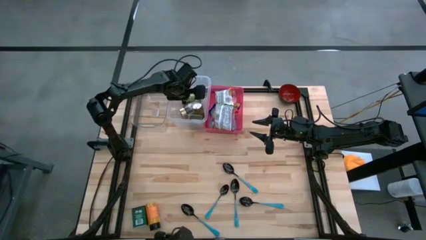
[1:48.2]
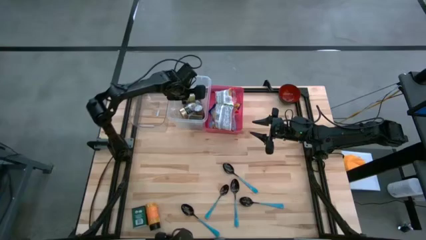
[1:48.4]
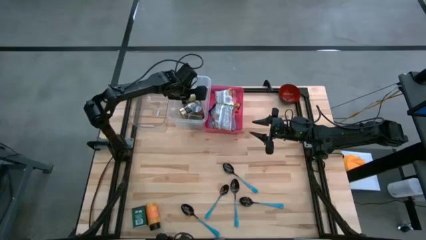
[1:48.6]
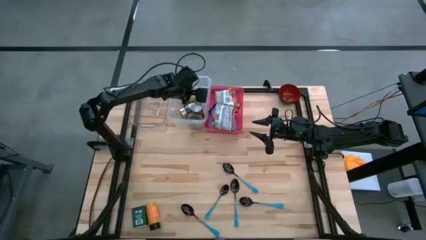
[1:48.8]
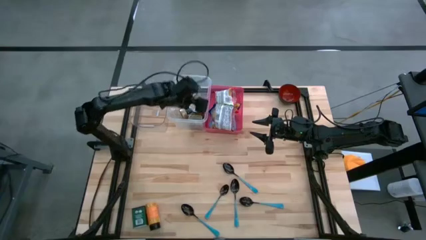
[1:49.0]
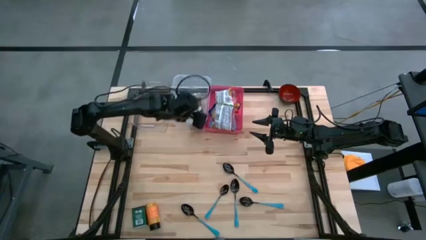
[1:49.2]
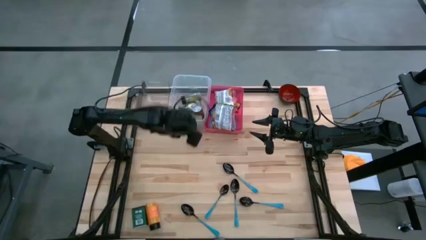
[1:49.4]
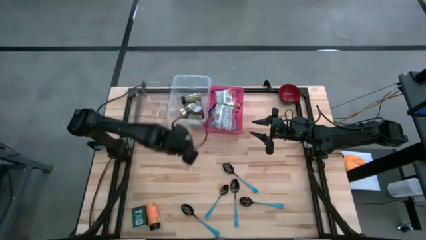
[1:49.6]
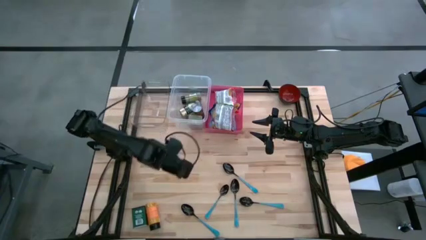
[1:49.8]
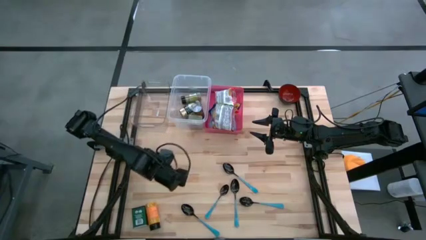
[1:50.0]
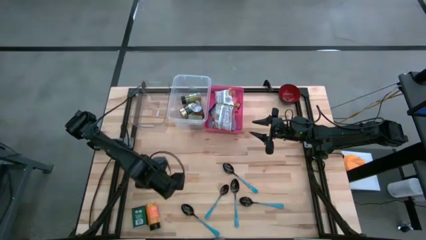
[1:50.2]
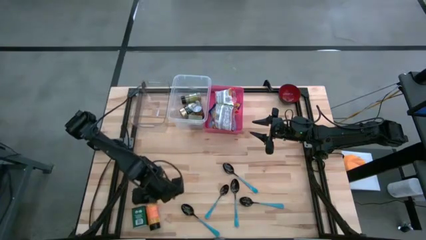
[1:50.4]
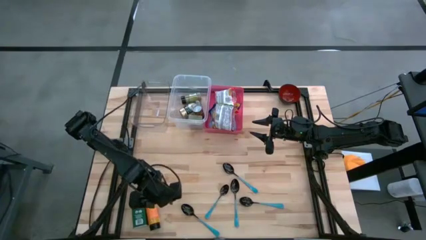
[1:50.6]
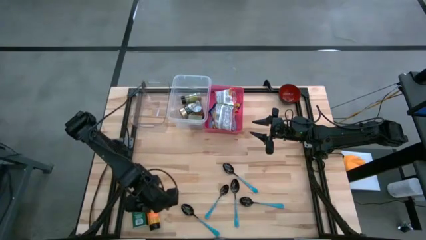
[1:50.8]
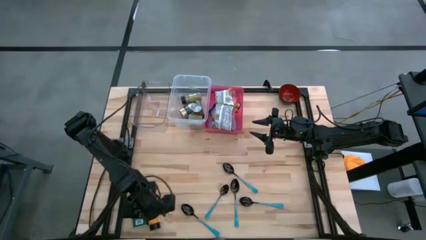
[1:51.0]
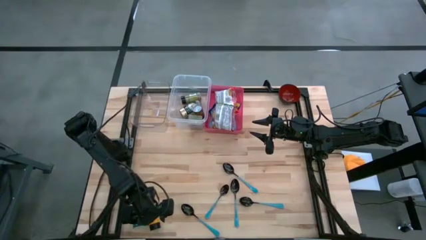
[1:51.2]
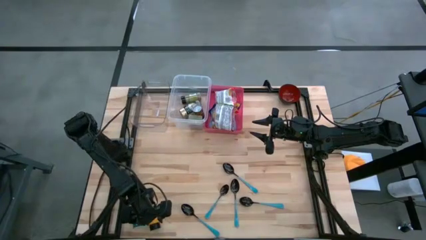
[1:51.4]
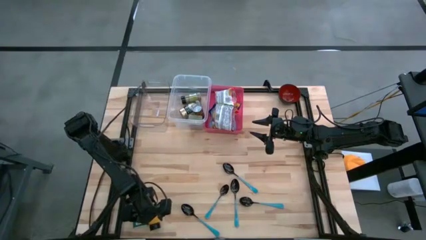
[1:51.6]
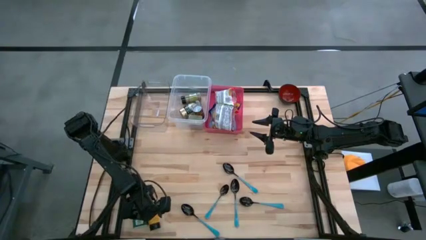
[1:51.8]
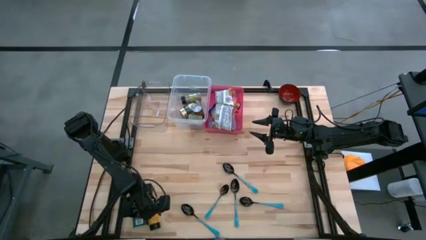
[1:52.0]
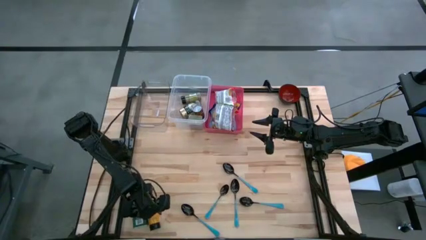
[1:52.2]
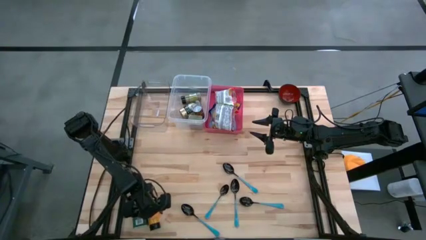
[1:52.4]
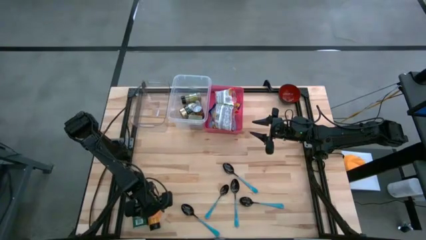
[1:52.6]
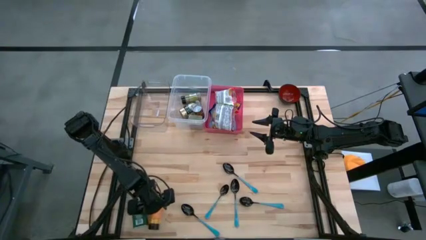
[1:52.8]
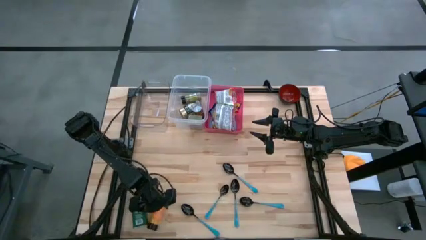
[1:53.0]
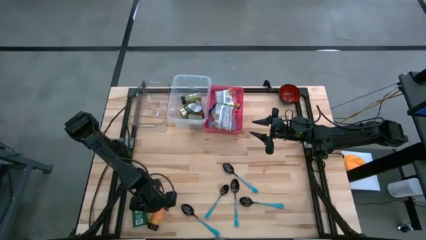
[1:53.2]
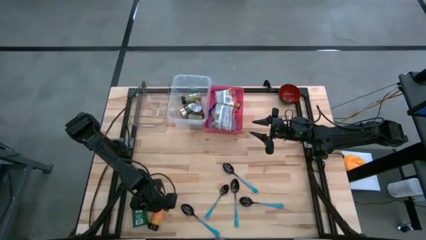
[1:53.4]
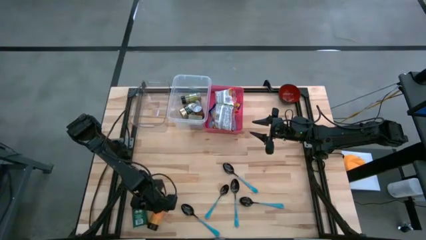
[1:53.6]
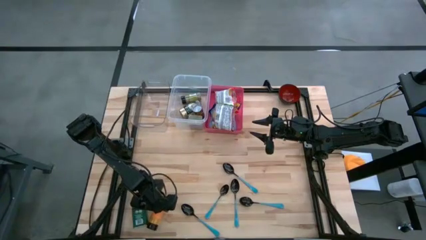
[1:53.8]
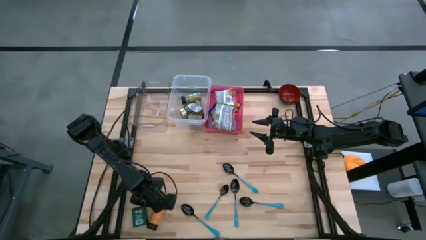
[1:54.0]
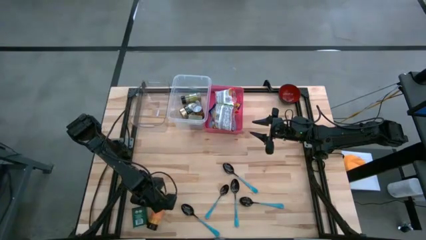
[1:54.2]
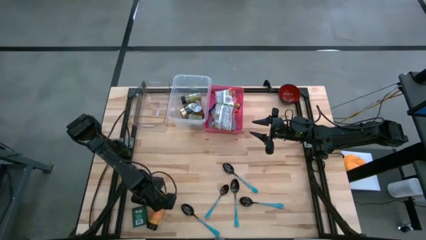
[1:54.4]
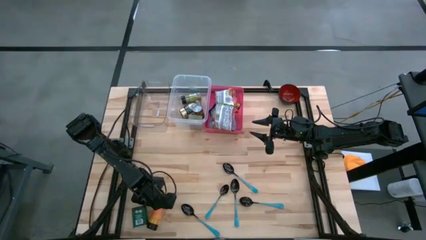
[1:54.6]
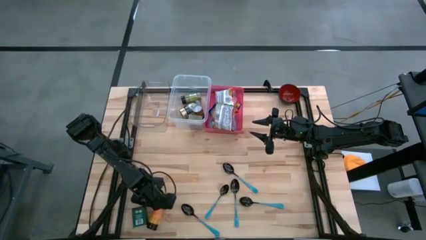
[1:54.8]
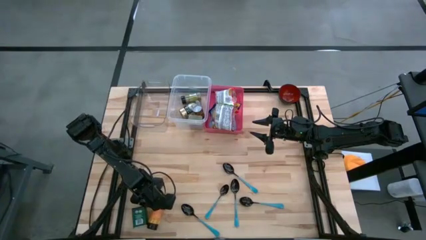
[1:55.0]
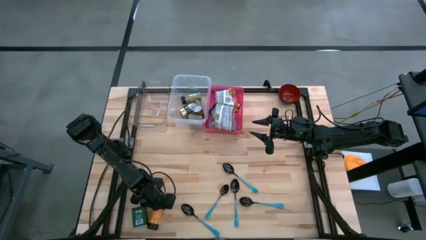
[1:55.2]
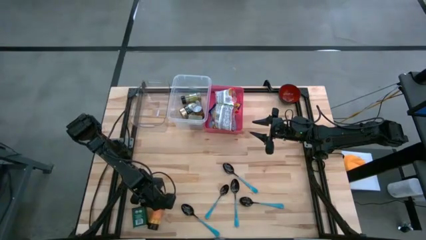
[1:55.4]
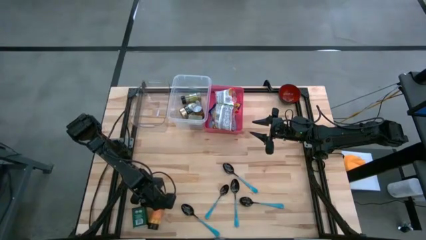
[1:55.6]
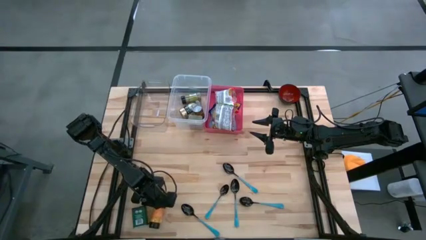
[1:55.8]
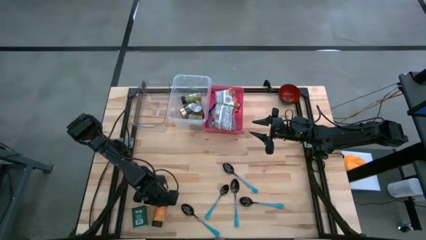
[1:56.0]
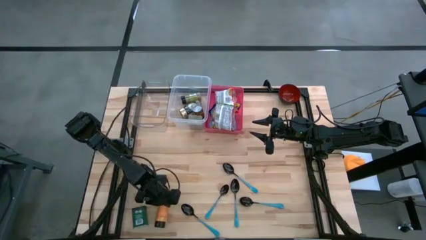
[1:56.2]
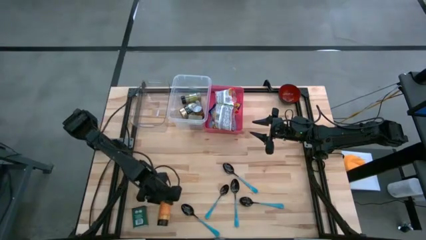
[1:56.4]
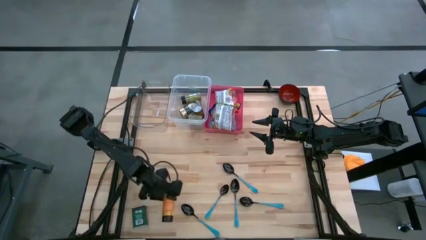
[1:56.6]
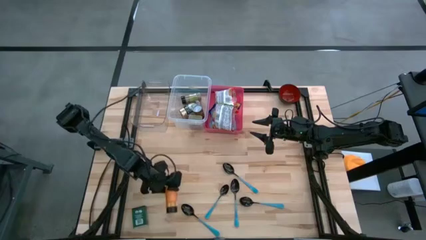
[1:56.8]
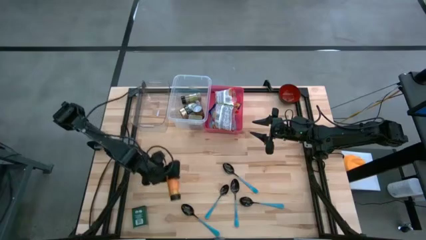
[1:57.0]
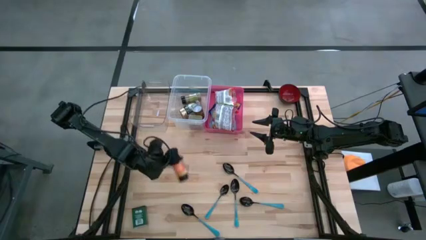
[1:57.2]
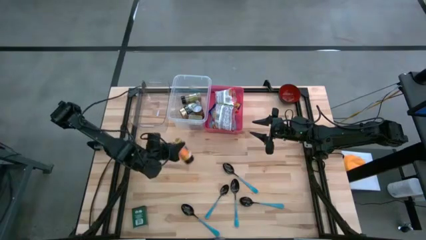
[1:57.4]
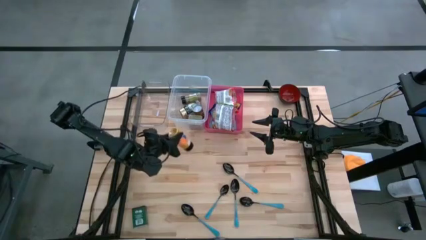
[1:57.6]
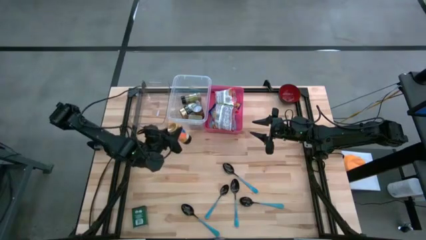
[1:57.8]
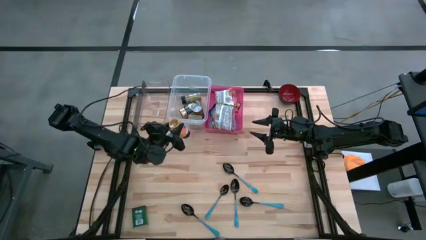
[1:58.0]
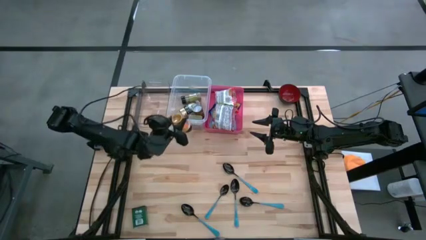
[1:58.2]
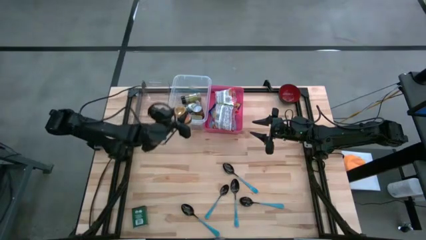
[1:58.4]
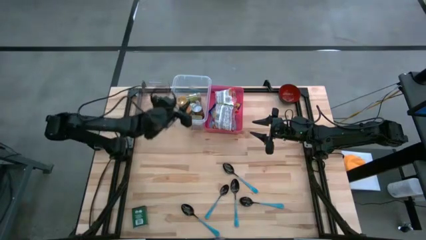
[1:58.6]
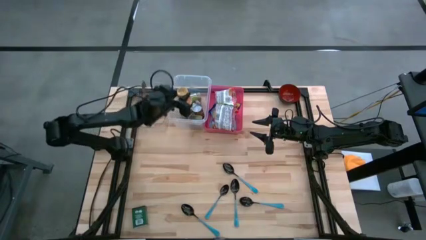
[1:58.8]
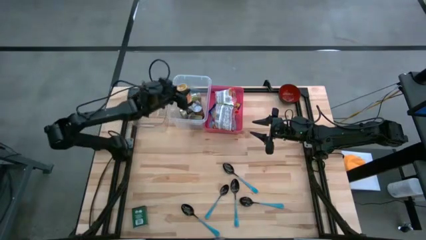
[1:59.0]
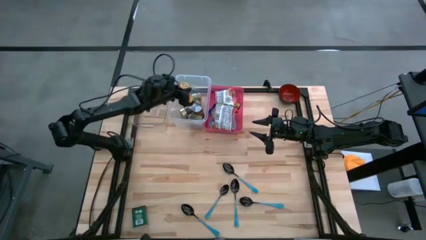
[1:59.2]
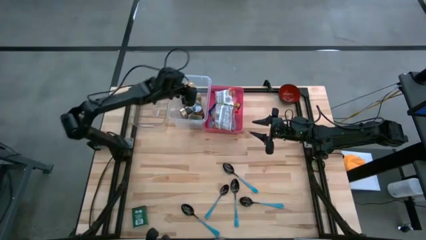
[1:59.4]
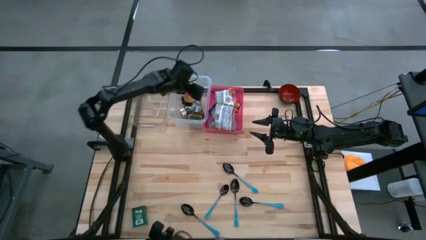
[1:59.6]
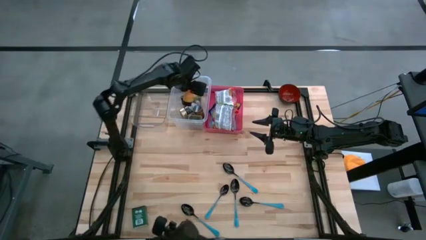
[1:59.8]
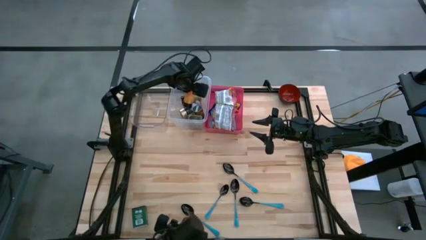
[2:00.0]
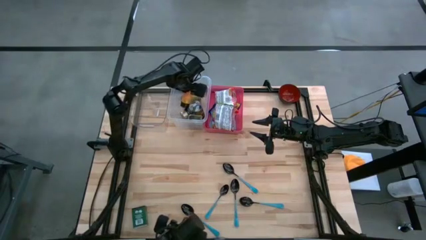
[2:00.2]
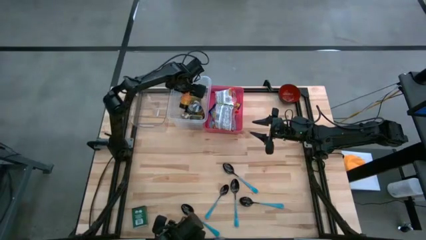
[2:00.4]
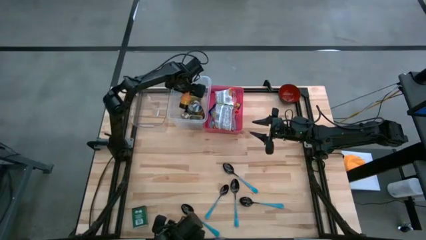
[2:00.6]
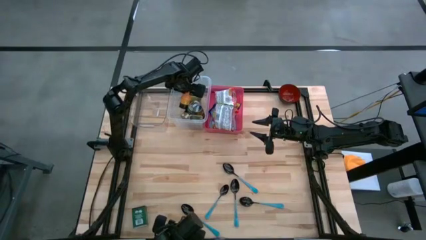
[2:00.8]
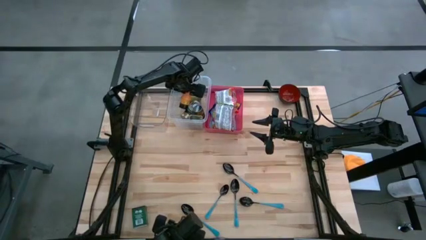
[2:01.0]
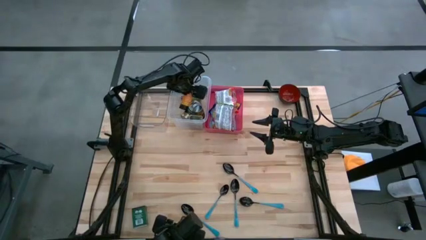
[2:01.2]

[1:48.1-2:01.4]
Put the orange seasoning bottle into the right transparent bin

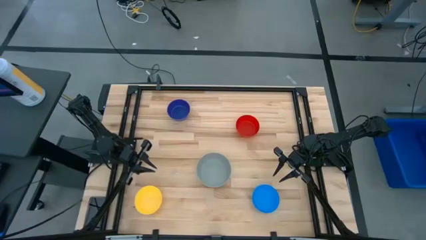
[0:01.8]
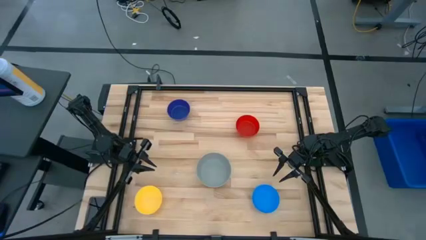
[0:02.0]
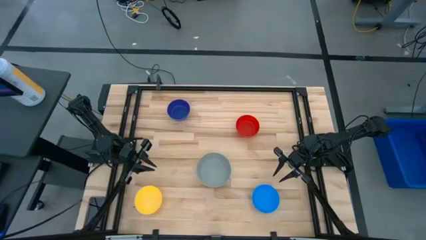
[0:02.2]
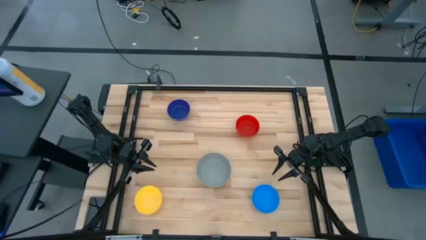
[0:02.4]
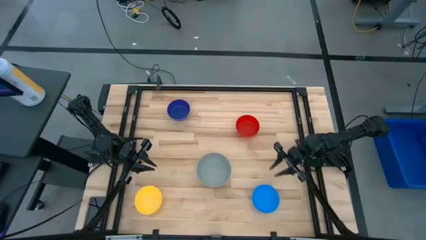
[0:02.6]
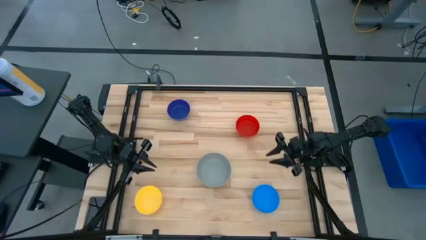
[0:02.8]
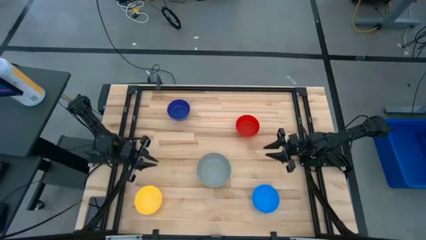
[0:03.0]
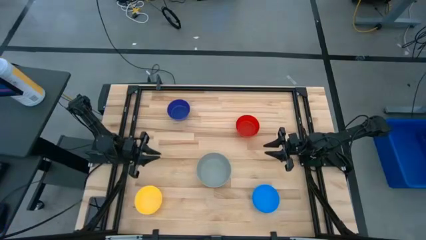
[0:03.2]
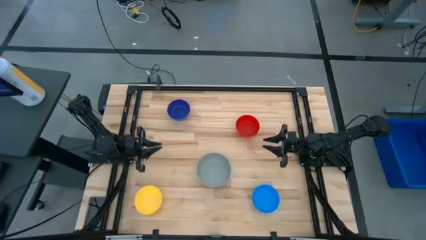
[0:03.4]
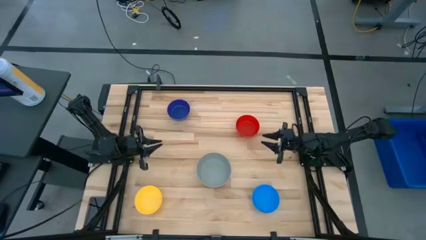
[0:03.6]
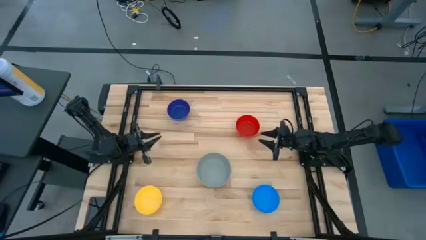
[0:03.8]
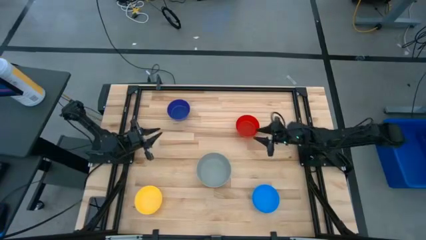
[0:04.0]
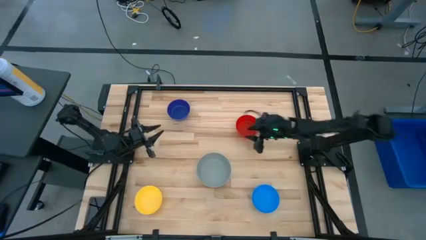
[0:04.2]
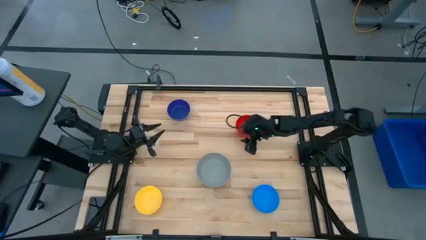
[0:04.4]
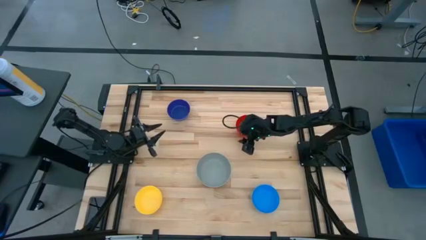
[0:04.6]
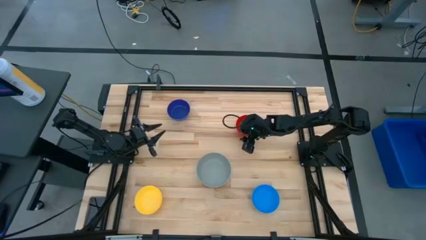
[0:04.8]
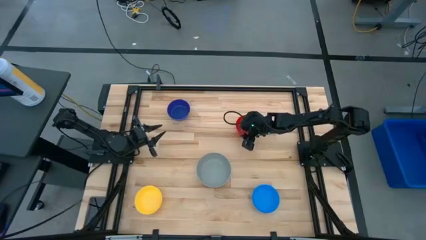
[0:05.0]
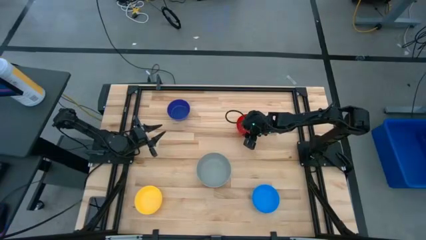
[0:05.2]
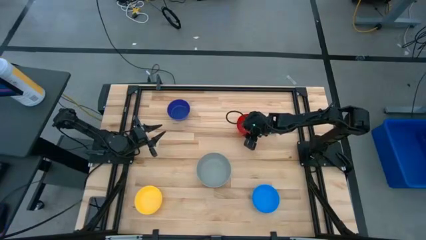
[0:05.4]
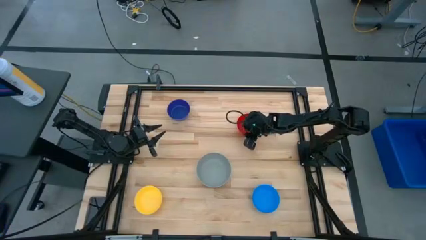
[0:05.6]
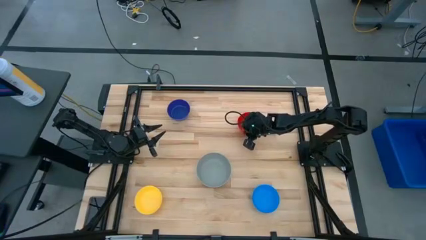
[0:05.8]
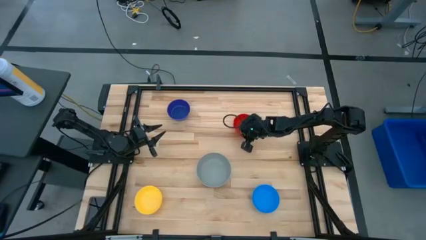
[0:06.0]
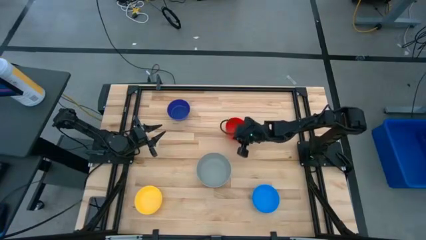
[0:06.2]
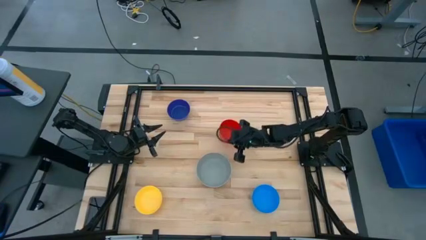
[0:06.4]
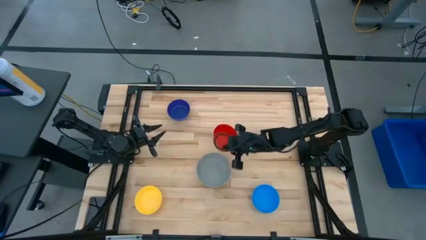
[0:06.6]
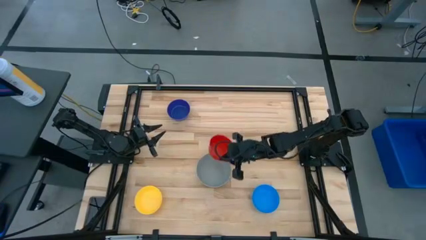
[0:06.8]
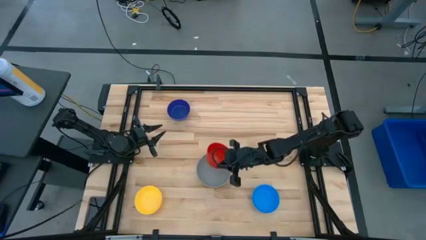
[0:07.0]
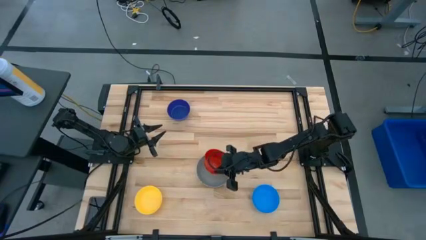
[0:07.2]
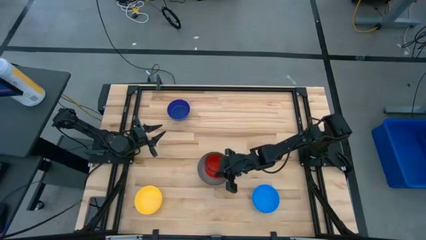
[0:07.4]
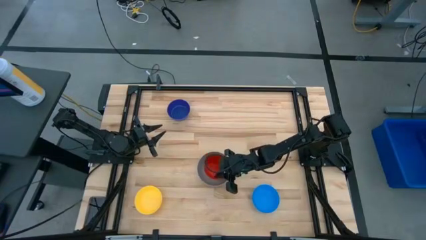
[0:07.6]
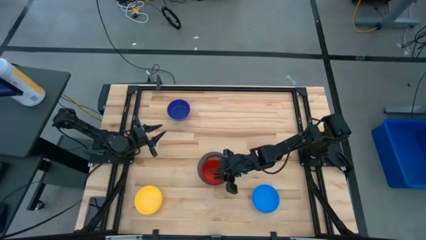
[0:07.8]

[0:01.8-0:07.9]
Stack the red bowl on the gray bowl
